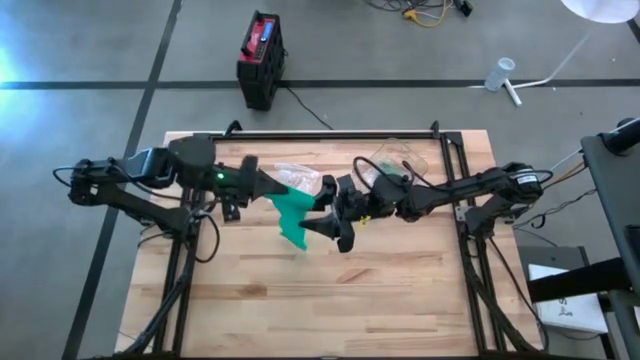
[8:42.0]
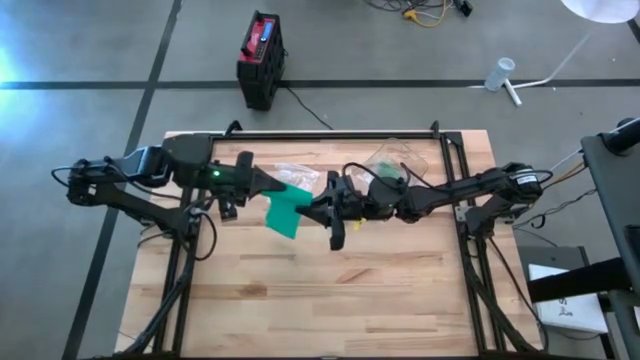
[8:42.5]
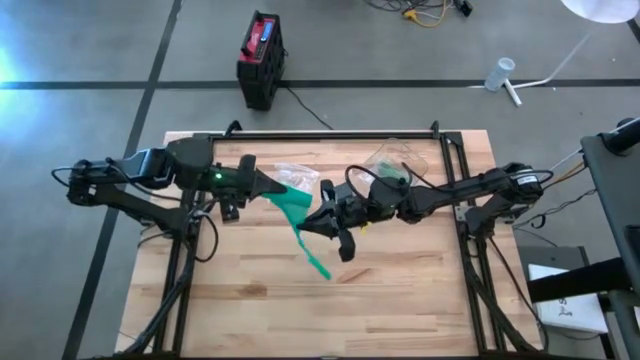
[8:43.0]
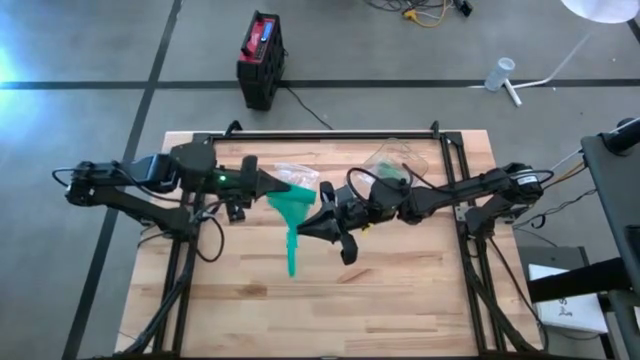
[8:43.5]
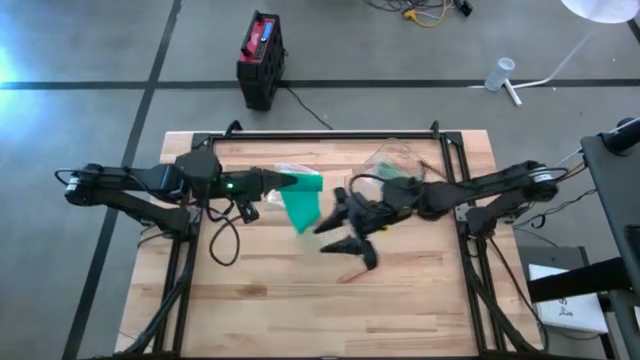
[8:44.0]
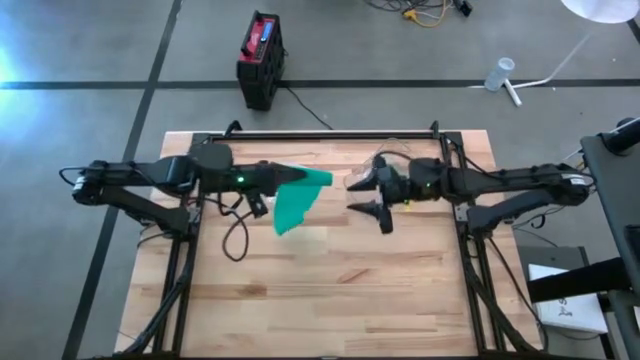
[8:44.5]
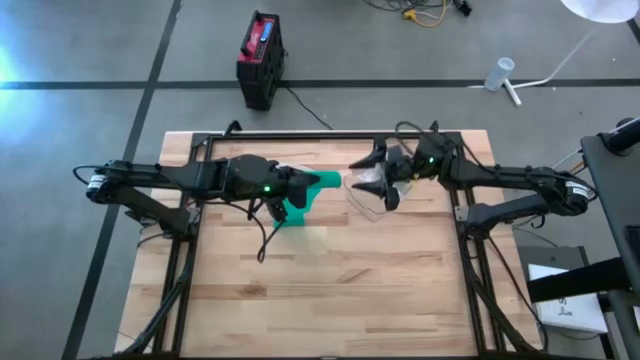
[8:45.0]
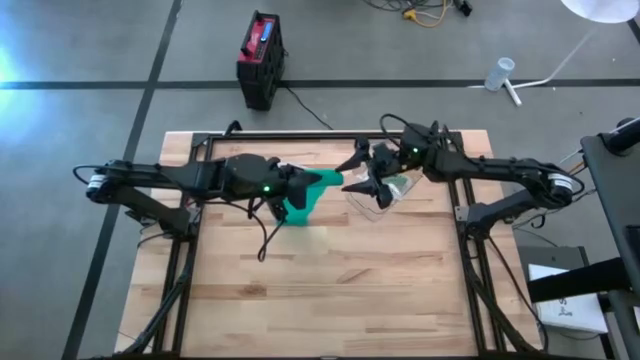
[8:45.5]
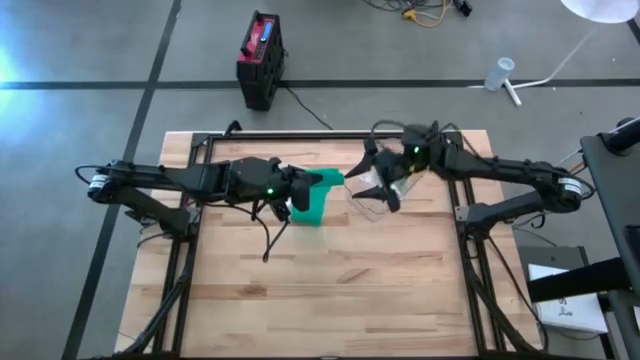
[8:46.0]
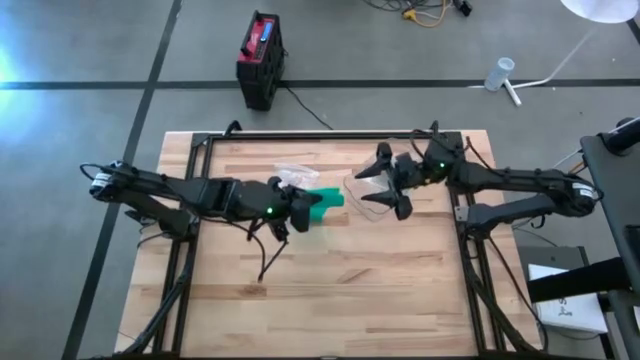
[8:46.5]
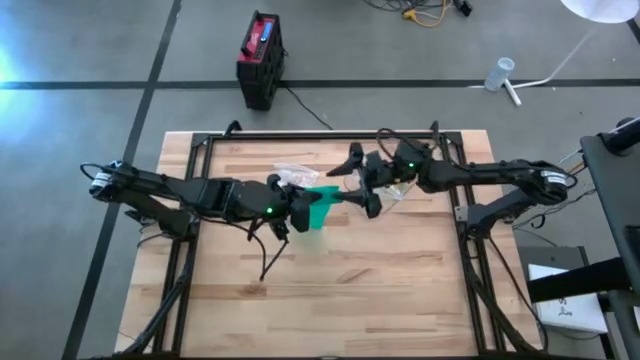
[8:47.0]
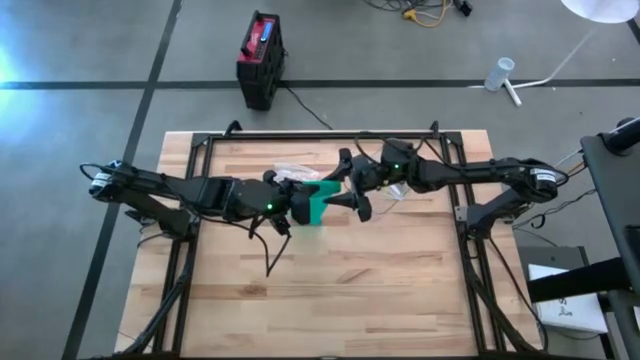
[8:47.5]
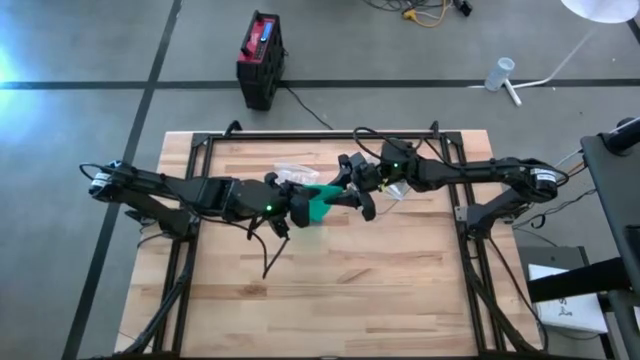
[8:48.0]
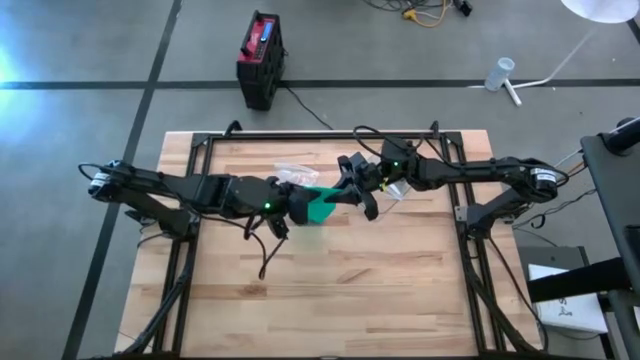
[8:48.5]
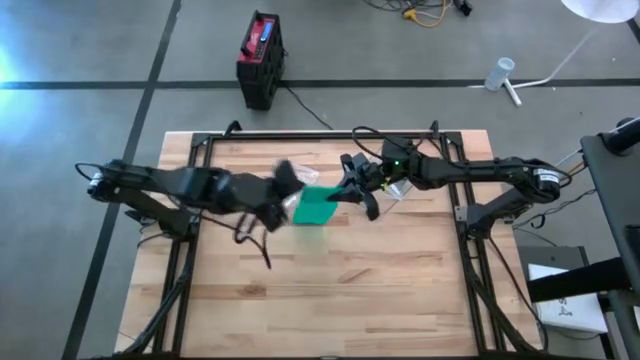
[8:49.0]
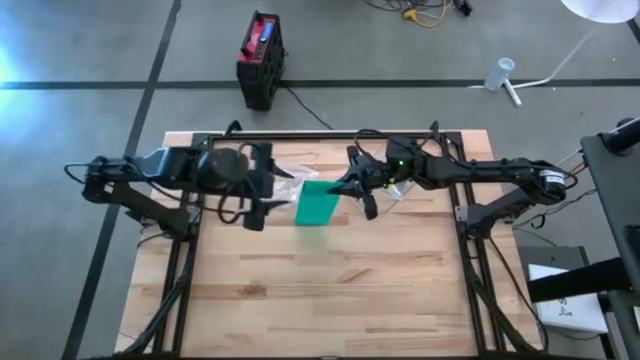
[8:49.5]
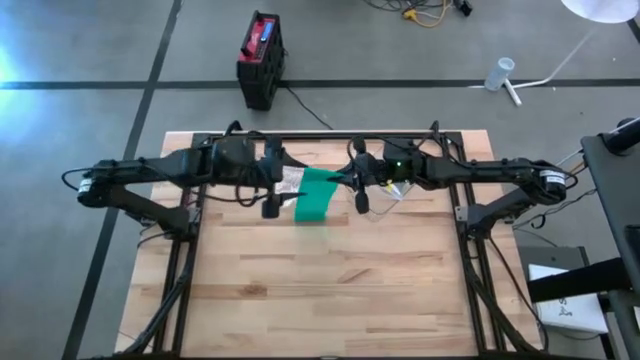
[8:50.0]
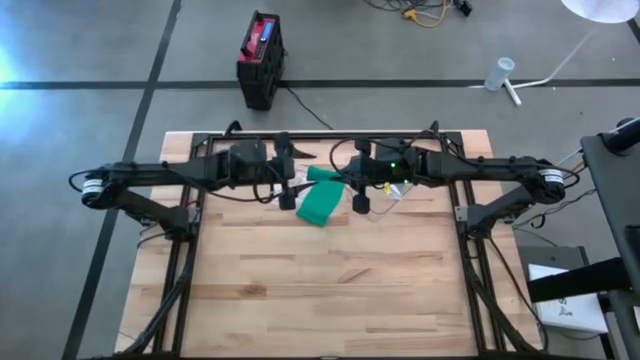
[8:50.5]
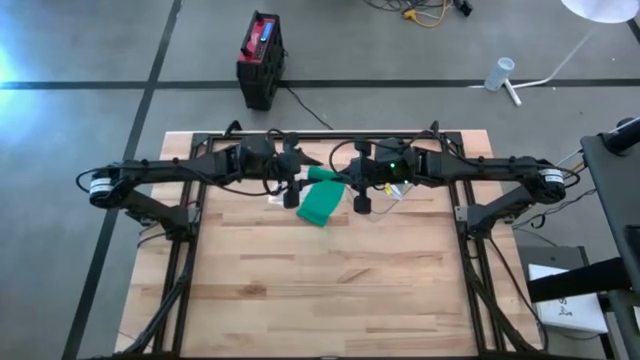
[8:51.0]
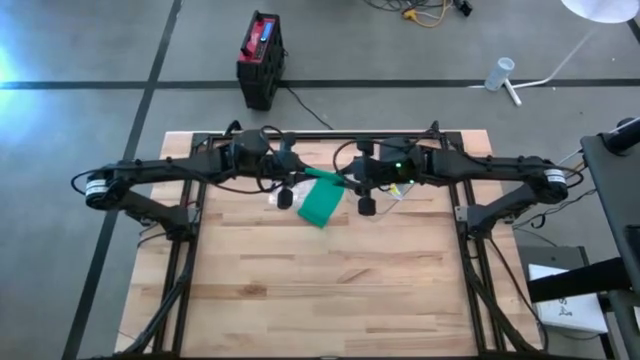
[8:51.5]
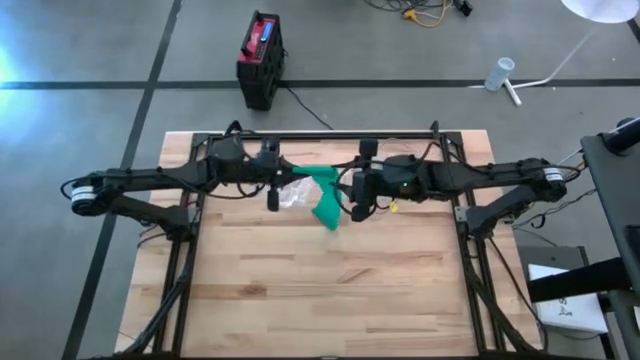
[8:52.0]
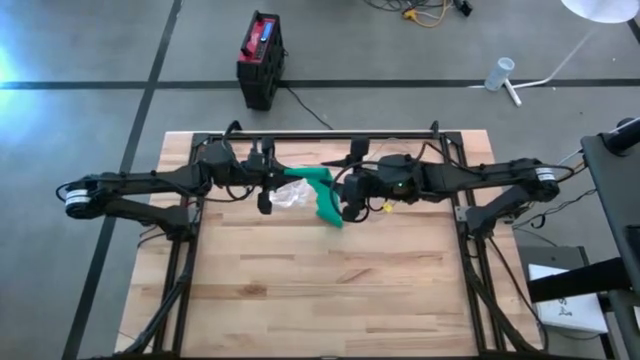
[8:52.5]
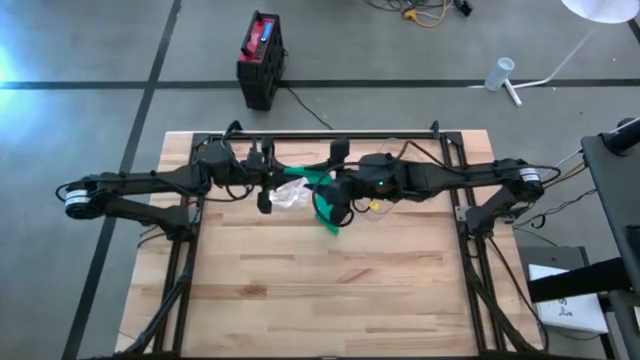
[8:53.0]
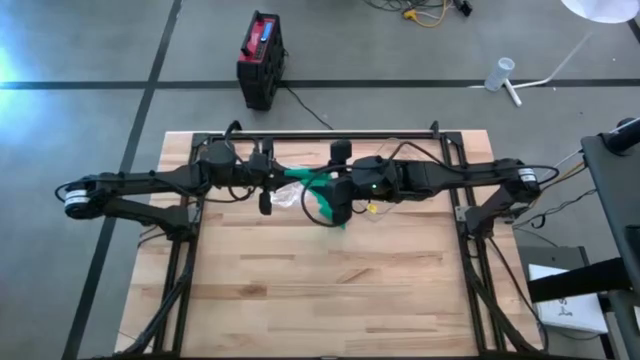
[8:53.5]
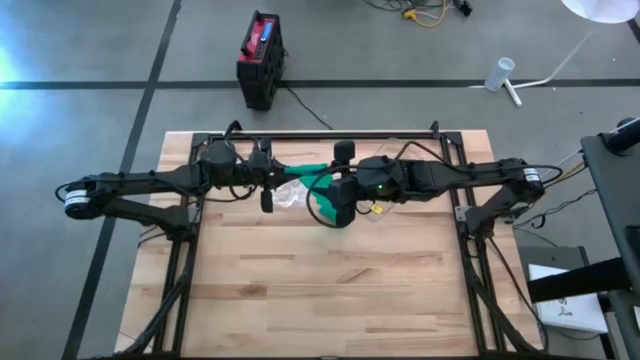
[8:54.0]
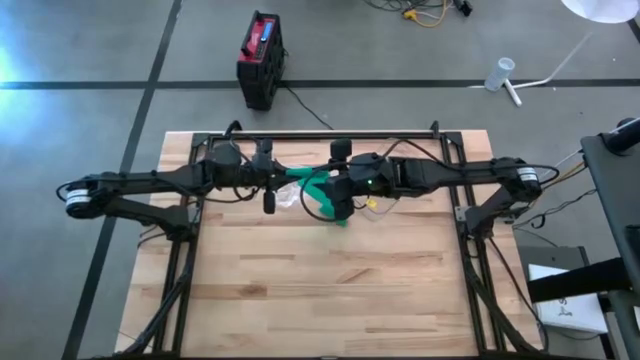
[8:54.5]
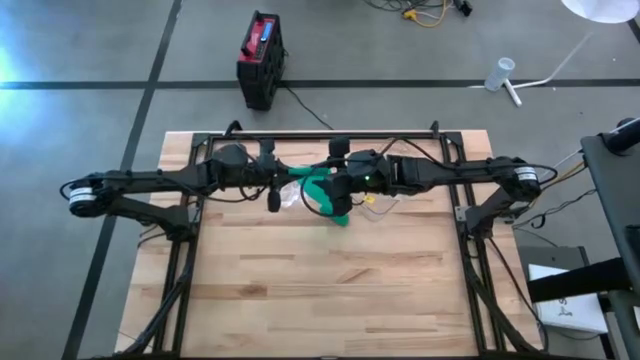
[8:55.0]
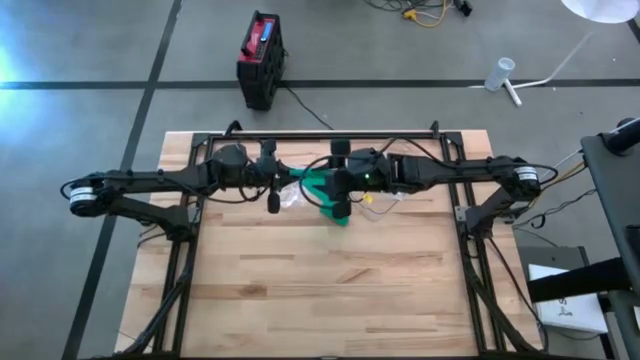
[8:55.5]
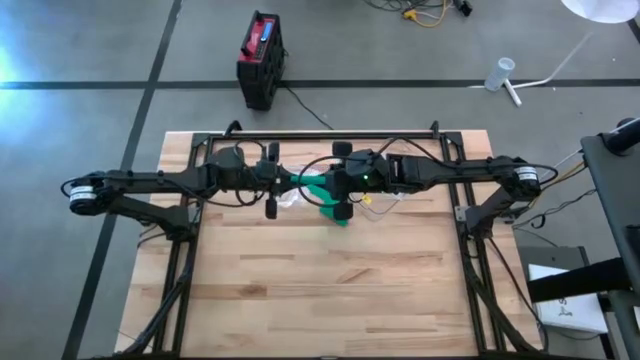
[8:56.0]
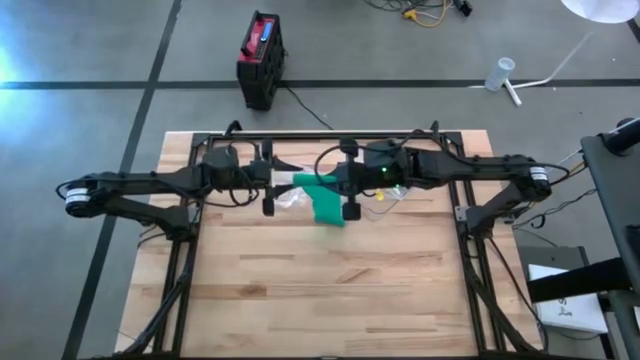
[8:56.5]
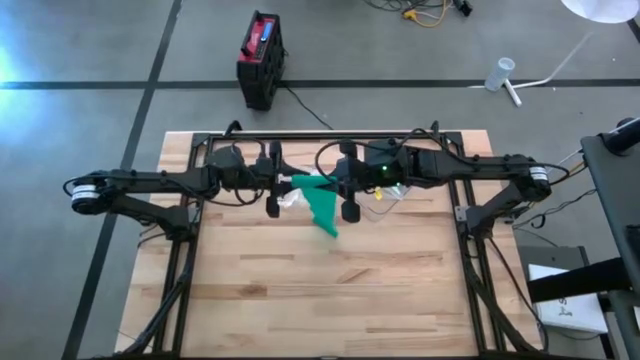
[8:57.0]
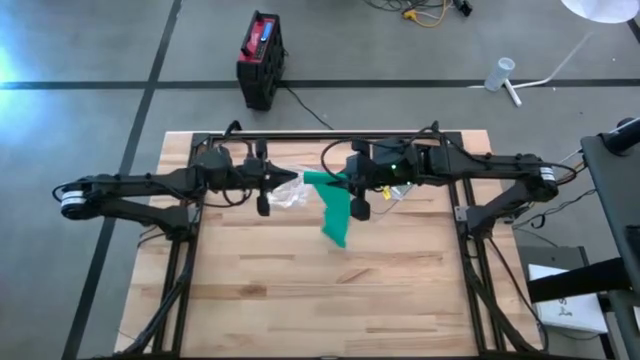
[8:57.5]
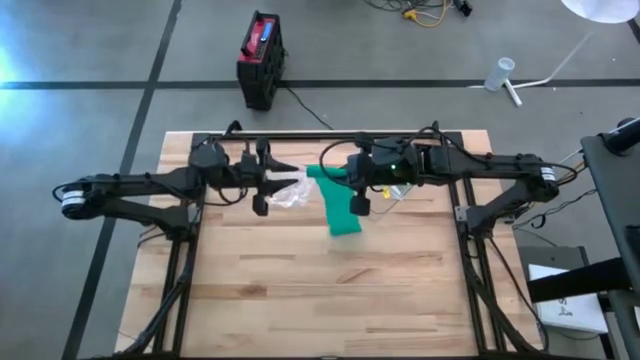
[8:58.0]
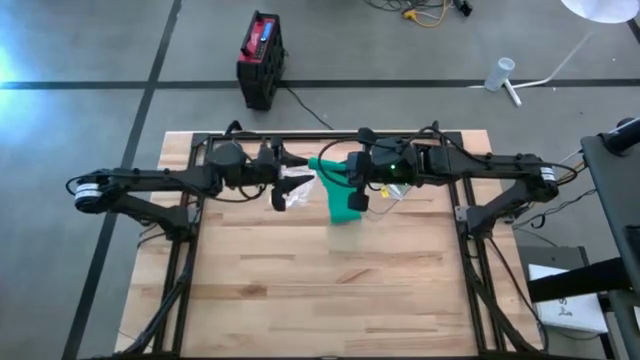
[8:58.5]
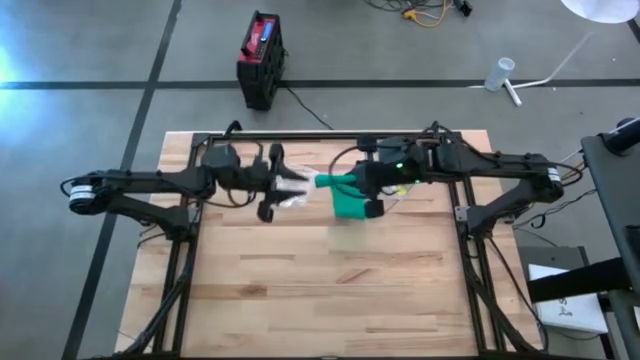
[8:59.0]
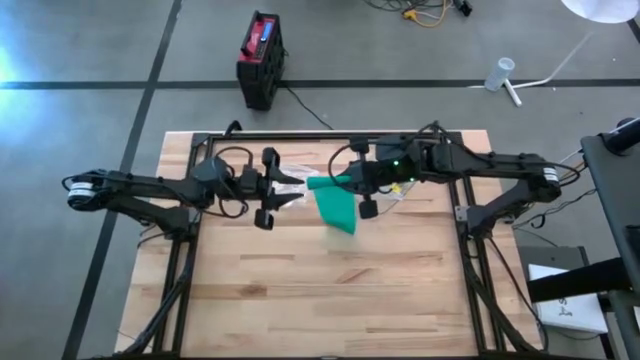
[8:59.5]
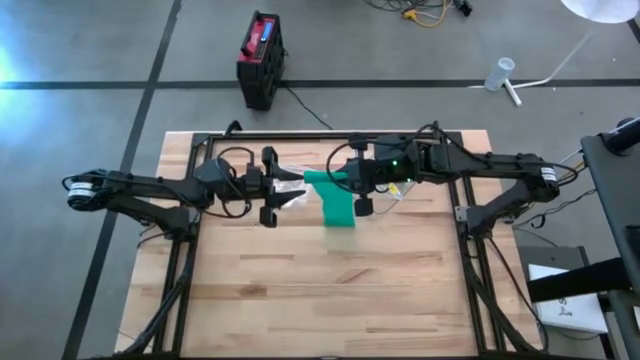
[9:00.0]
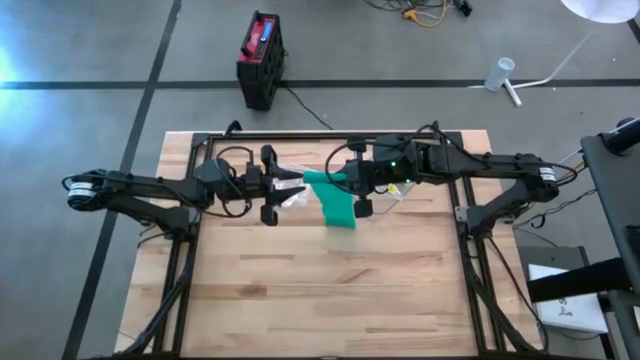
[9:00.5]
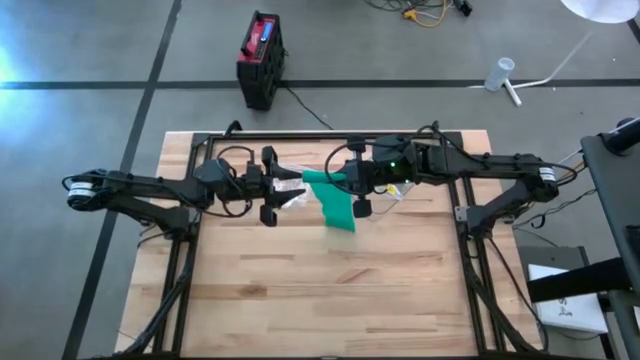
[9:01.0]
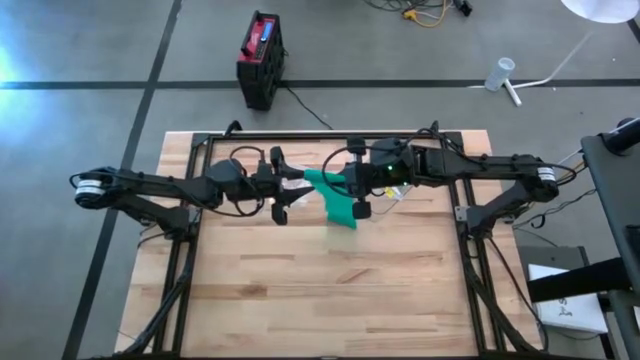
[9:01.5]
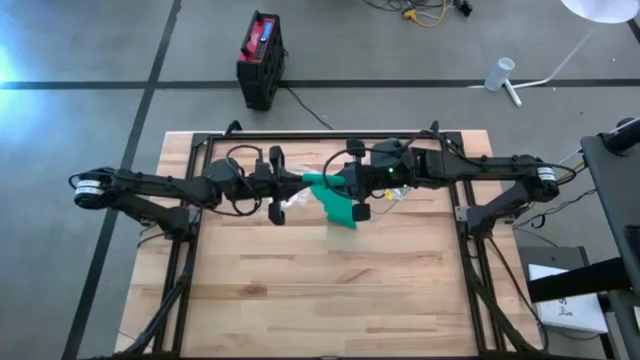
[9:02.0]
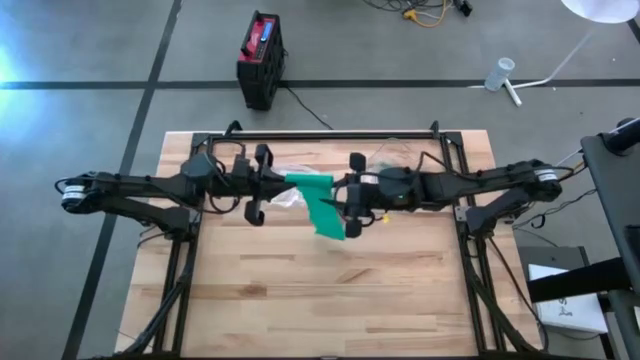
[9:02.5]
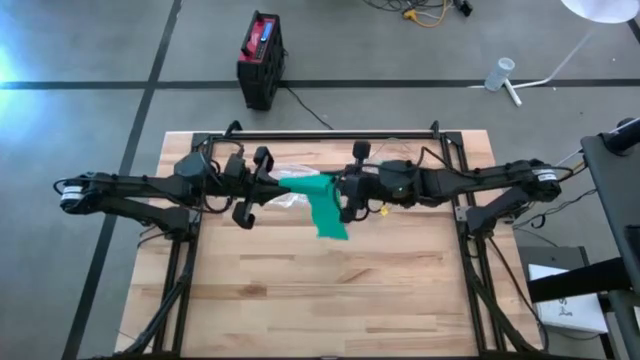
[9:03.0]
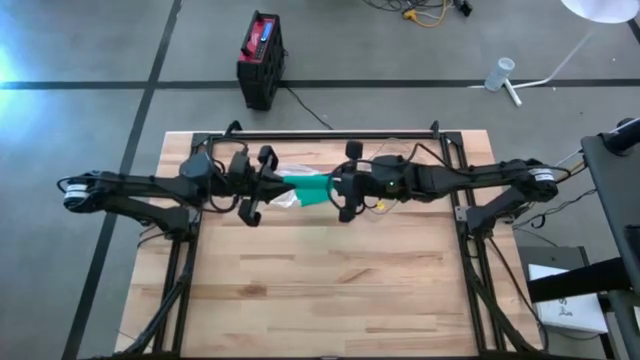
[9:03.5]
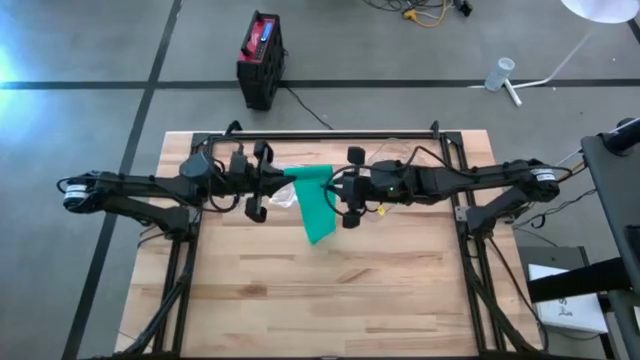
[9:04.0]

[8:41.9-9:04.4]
Task: Roll bandage
Roll the dark green bandage
